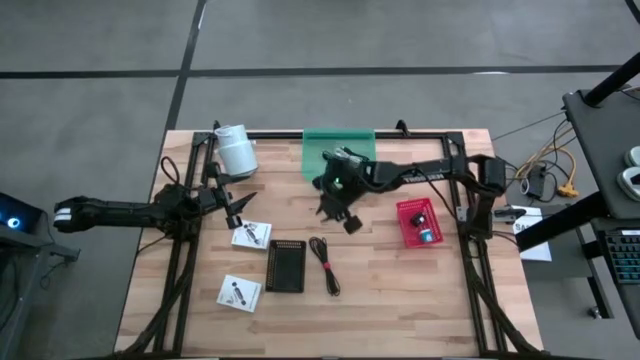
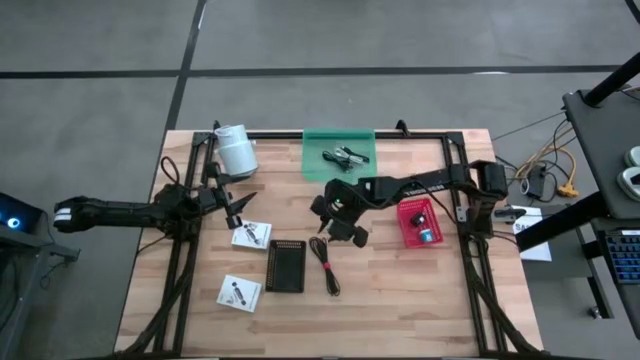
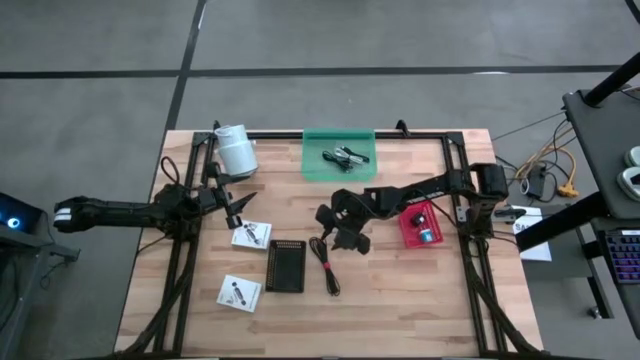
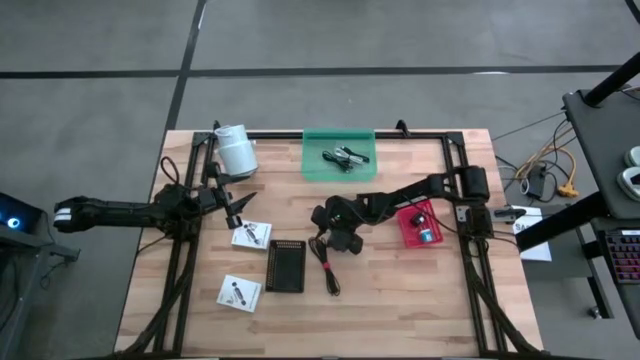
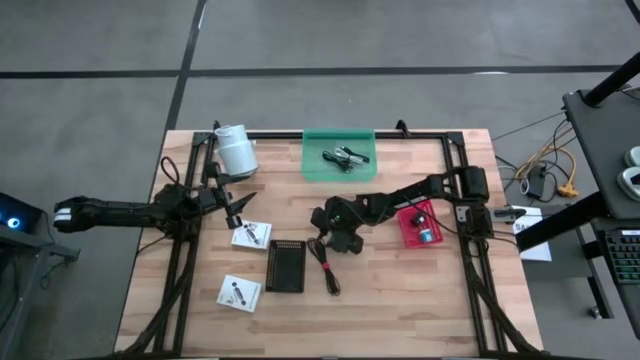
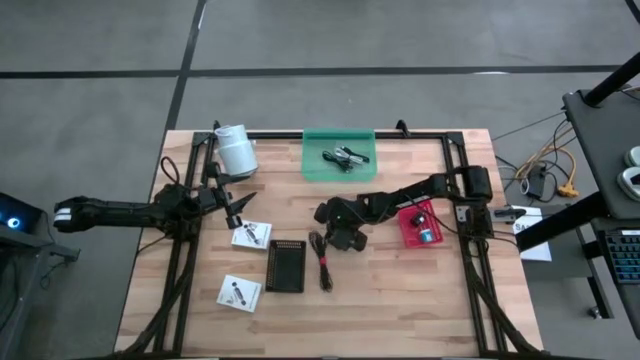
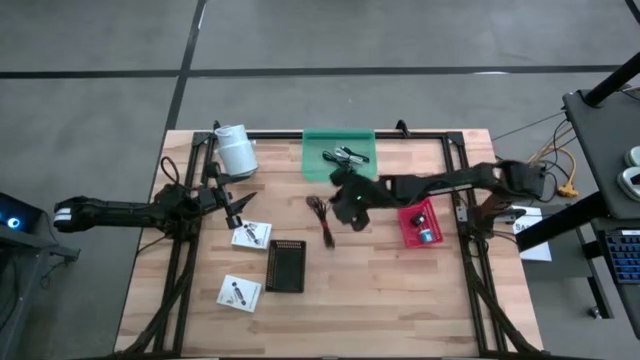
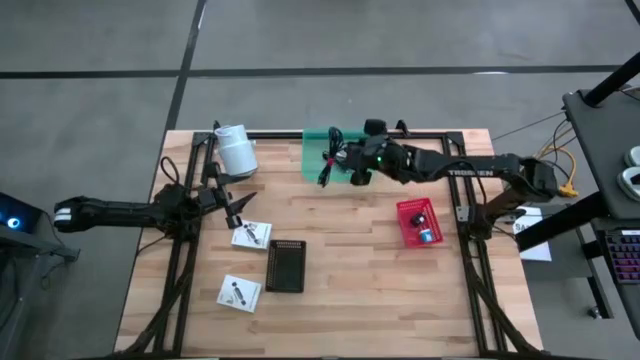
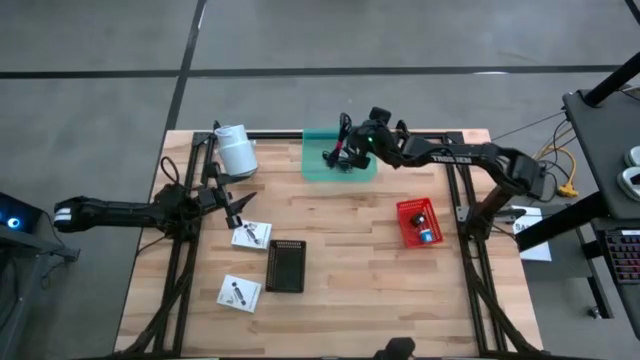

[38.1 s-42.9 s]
Task: Pick and place items into bin
Put the black charger cable wire into the green bin

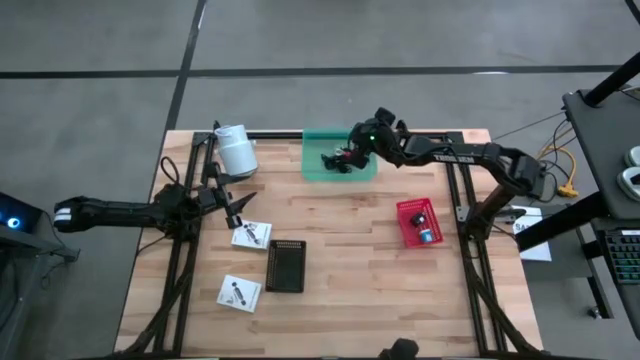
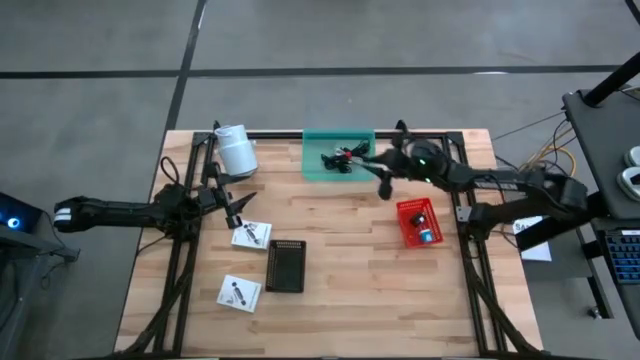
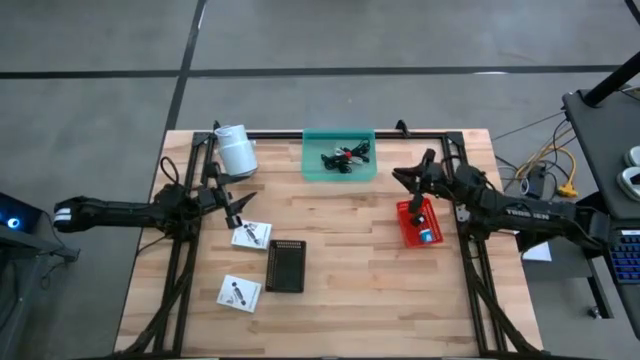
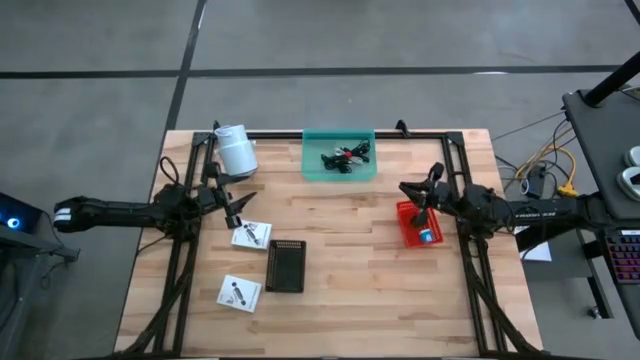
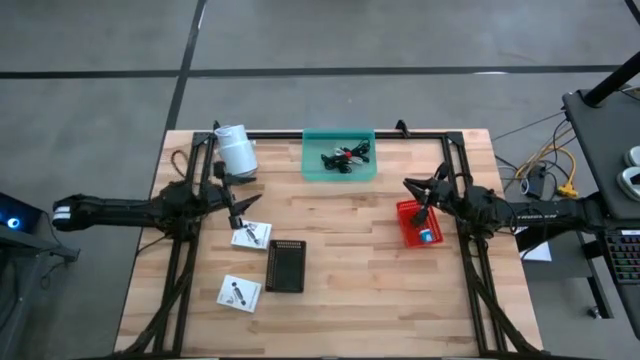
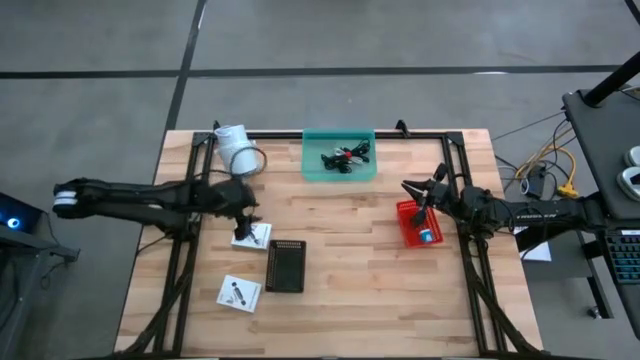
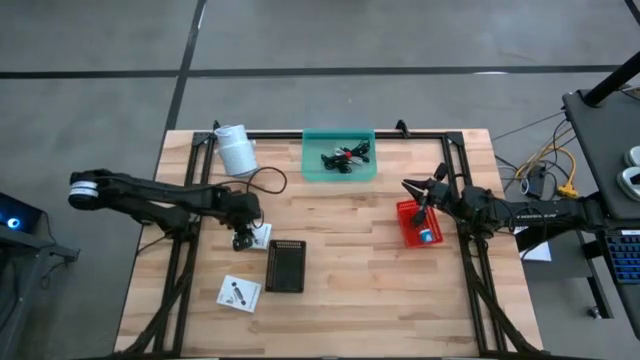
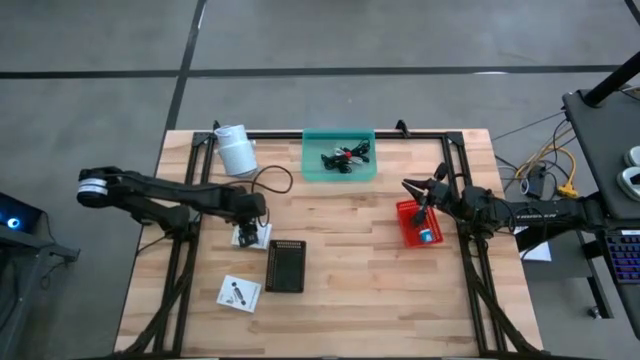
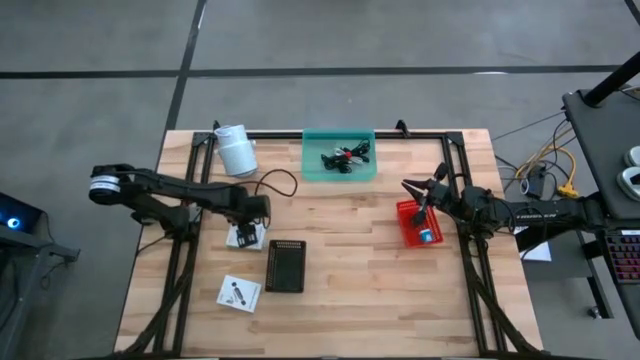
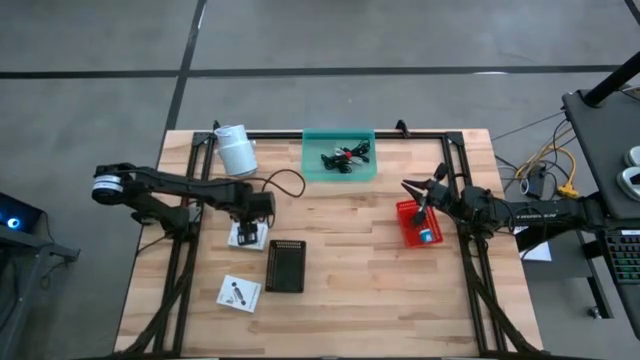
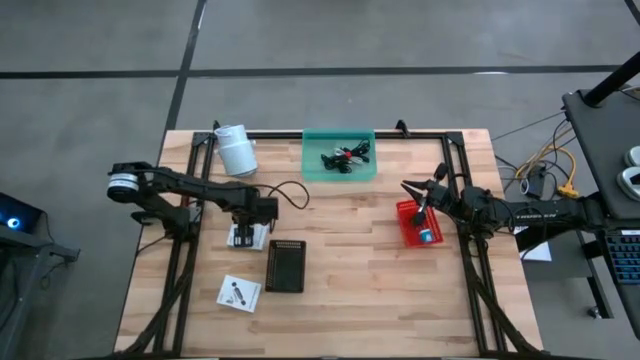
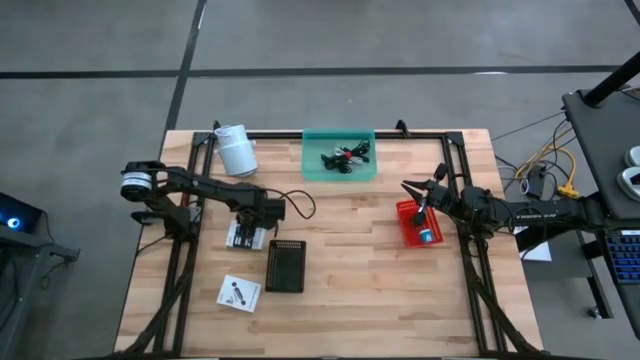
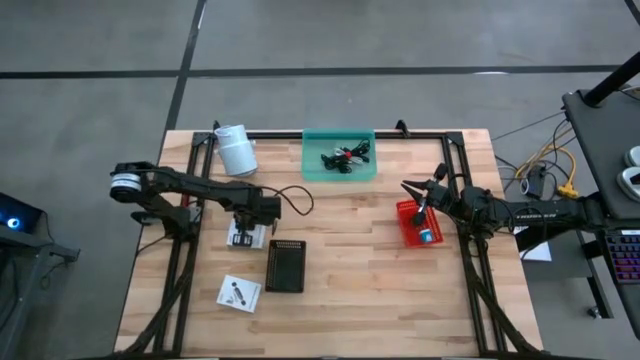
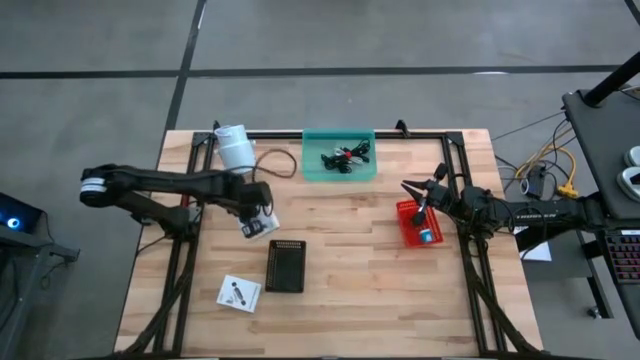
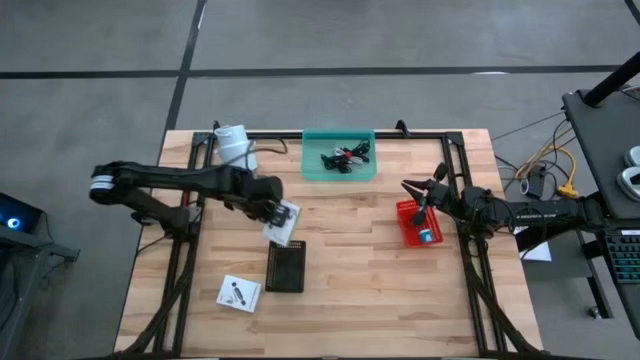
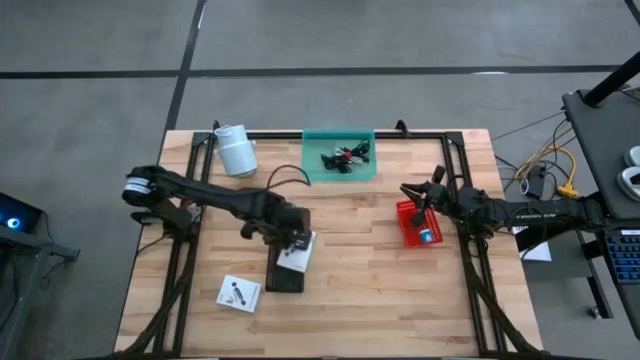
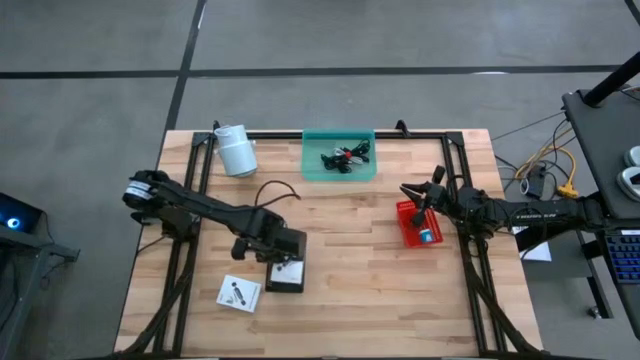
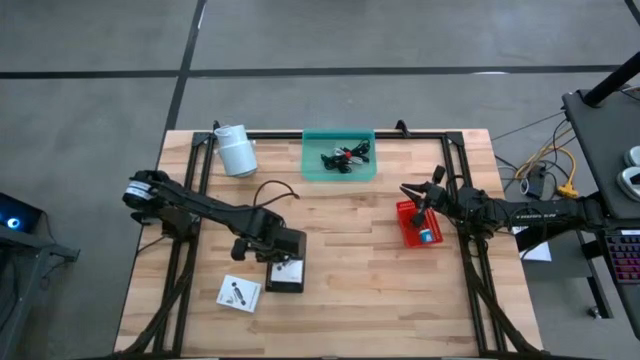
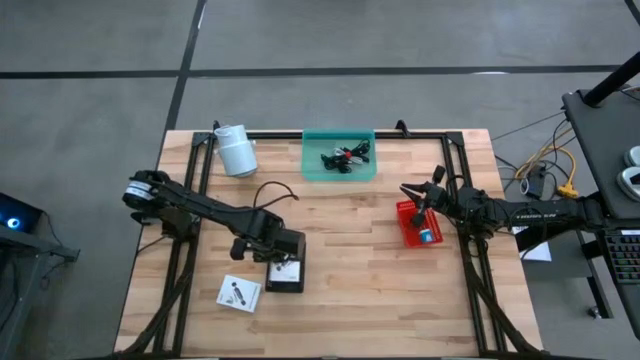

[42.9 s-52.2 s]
Put the top card reader box into the black bin

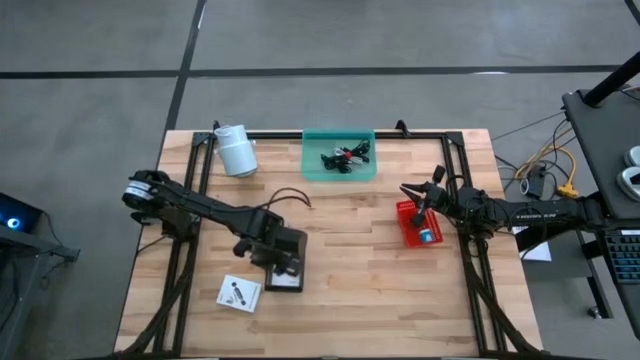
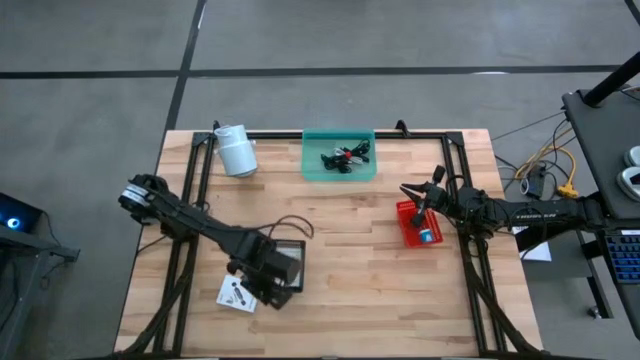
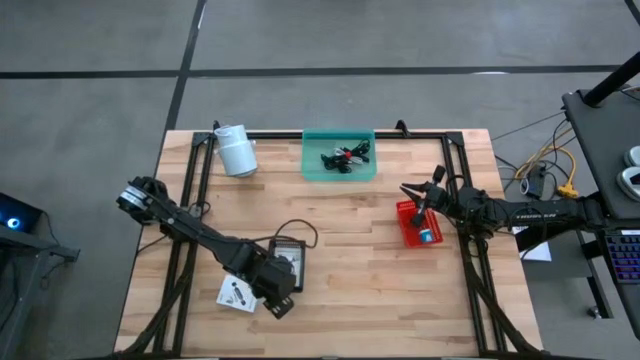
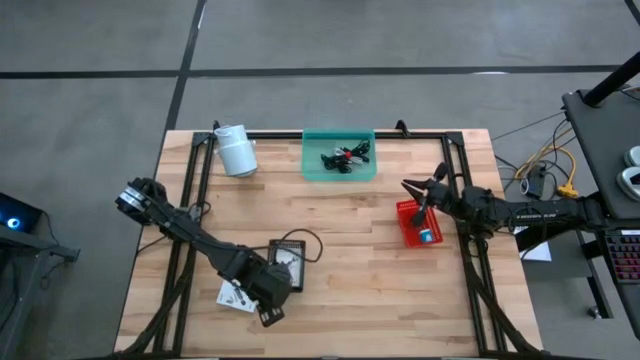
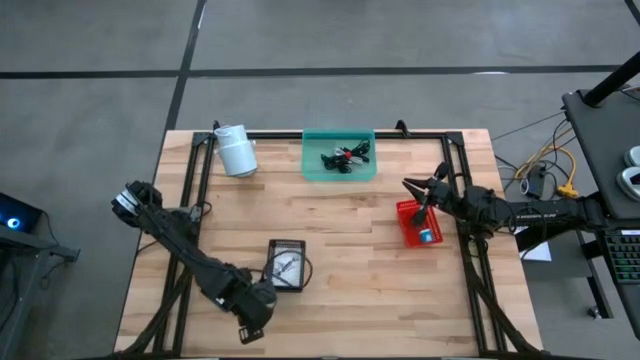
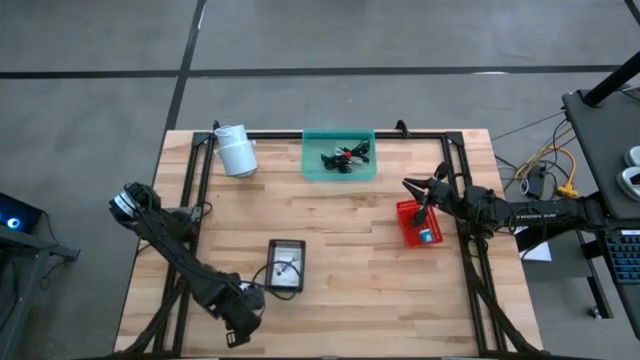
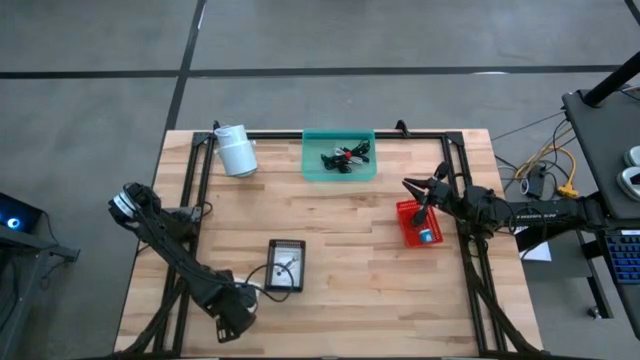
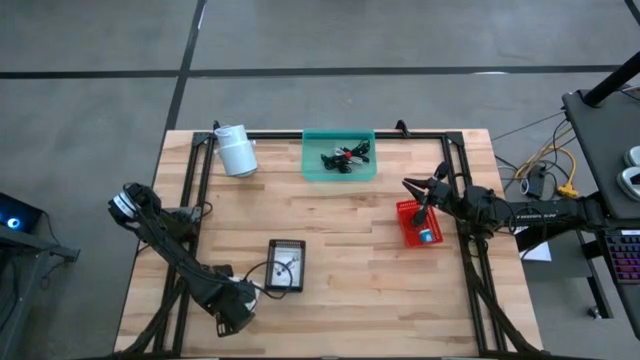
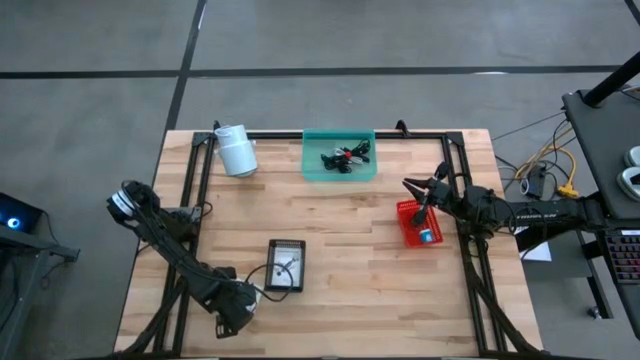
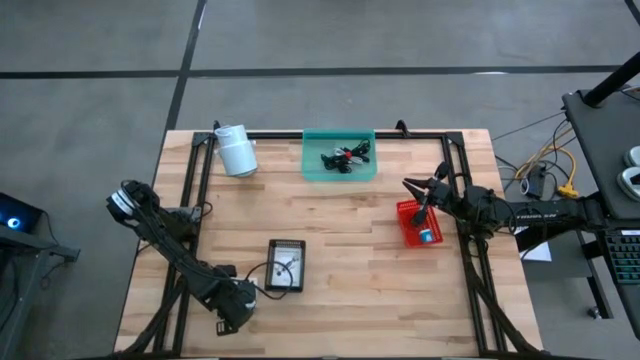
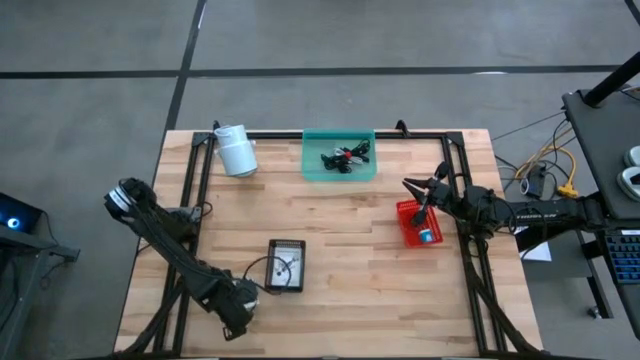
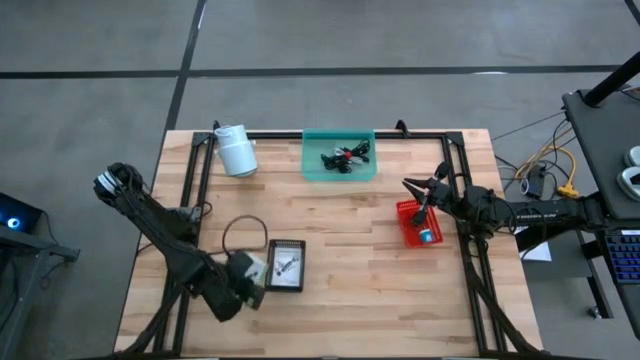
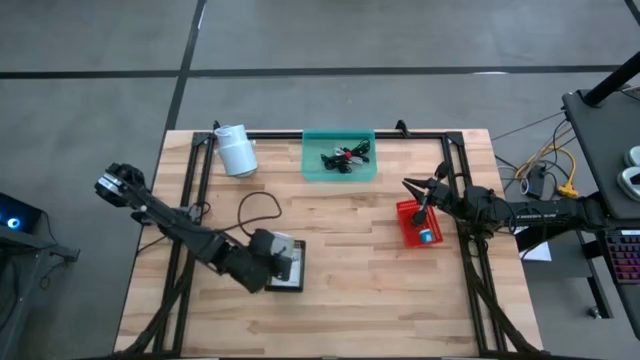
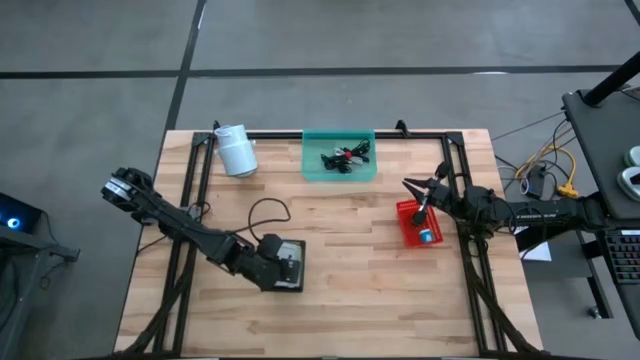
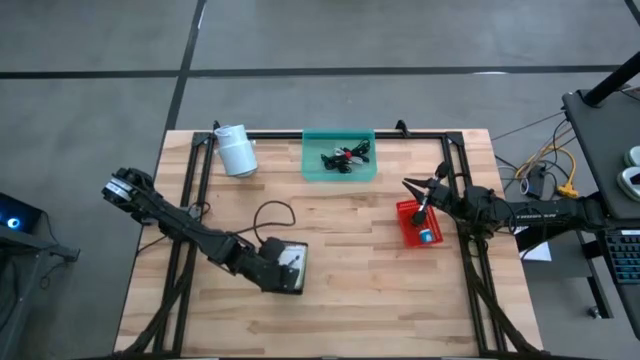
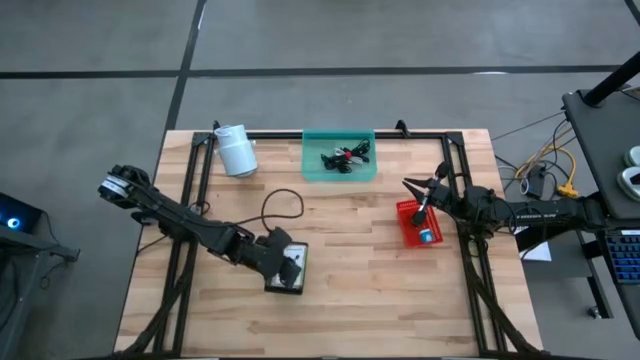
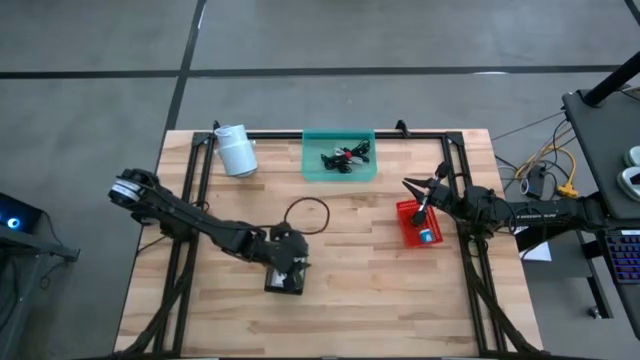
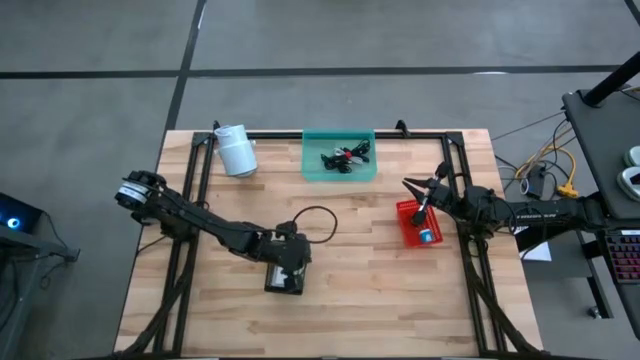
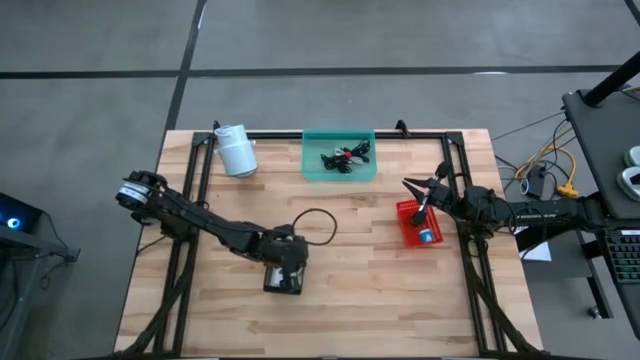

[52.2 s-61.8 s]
Put the card reader box into the black bin
